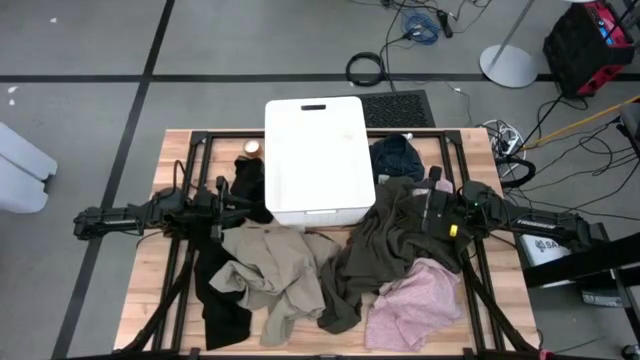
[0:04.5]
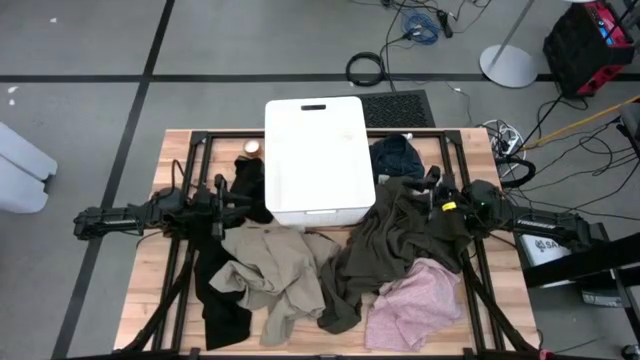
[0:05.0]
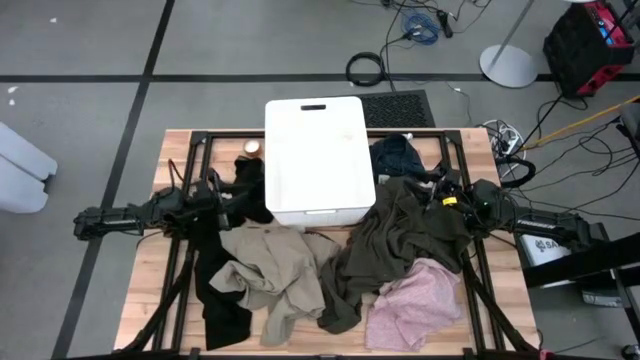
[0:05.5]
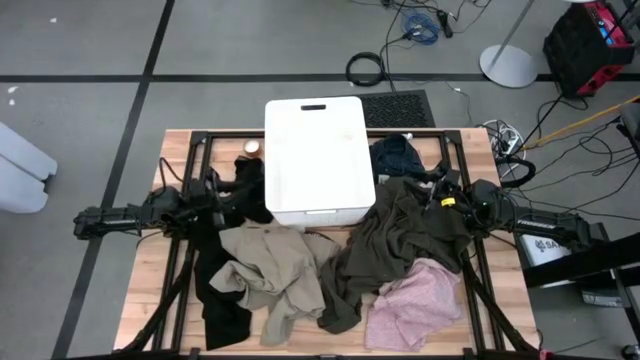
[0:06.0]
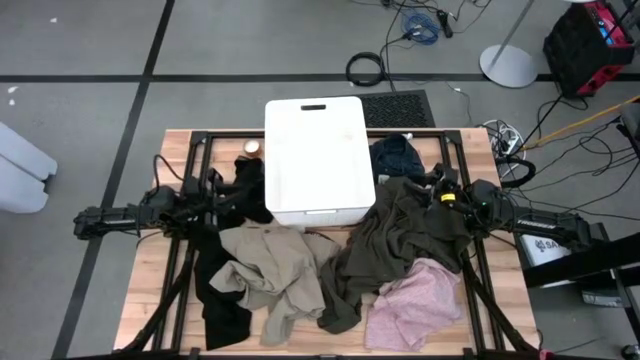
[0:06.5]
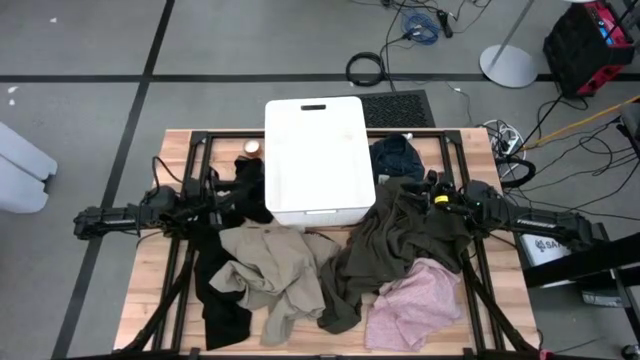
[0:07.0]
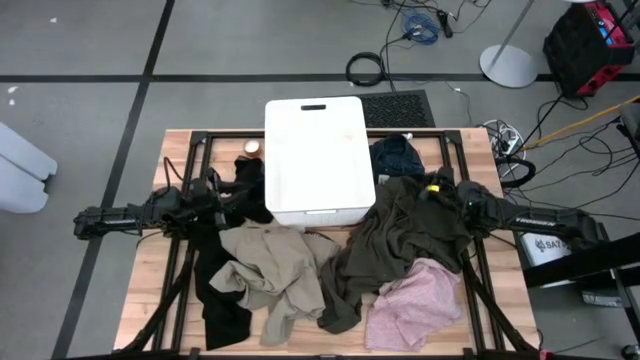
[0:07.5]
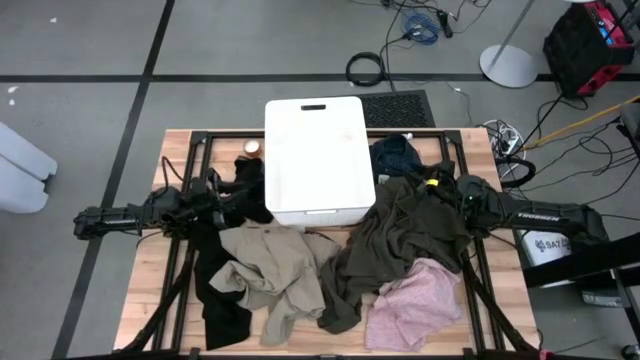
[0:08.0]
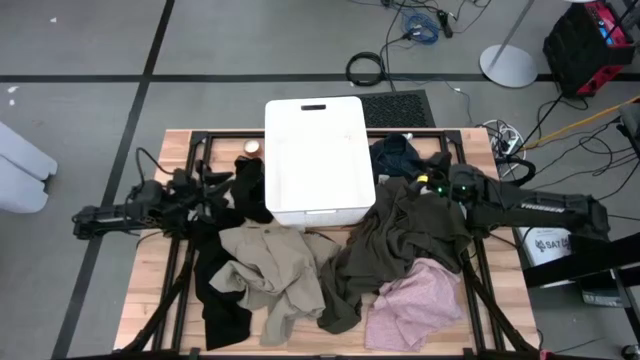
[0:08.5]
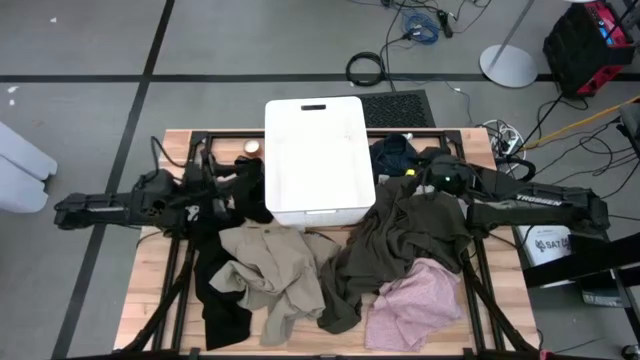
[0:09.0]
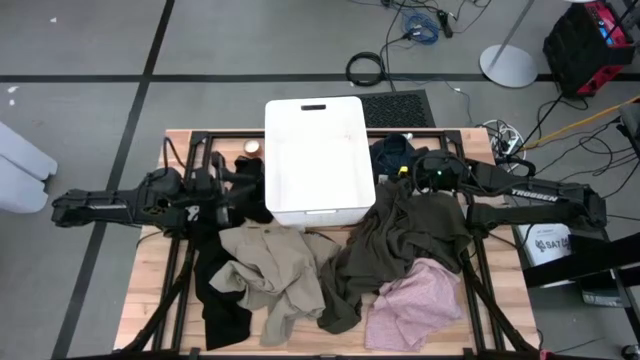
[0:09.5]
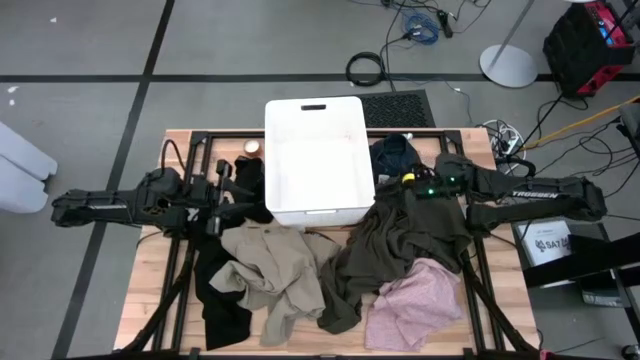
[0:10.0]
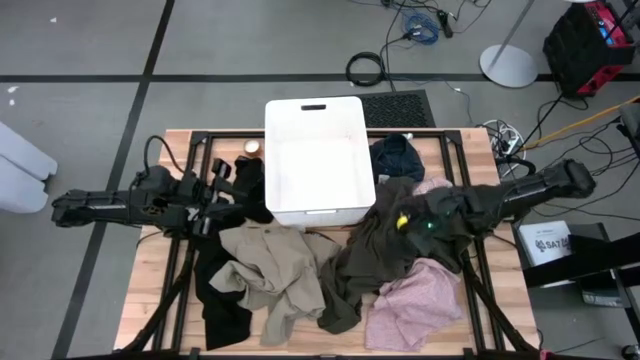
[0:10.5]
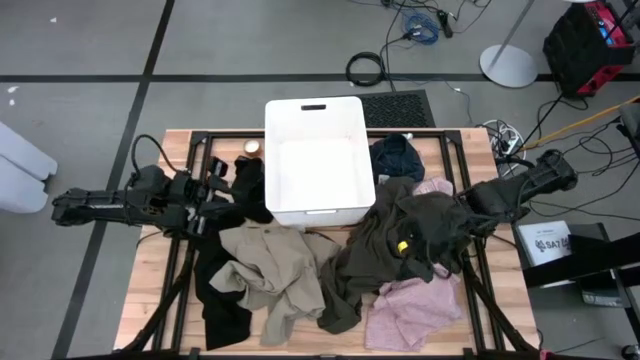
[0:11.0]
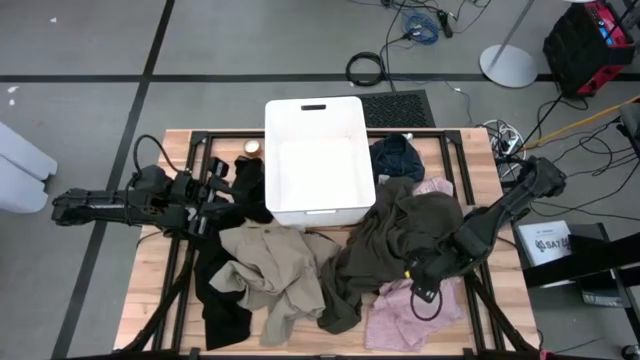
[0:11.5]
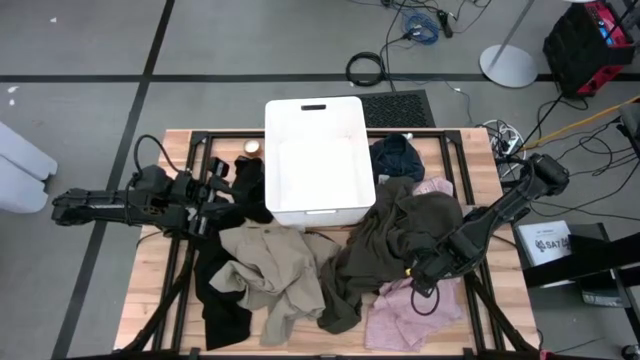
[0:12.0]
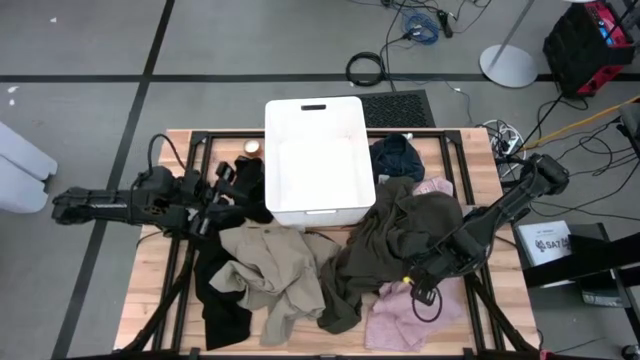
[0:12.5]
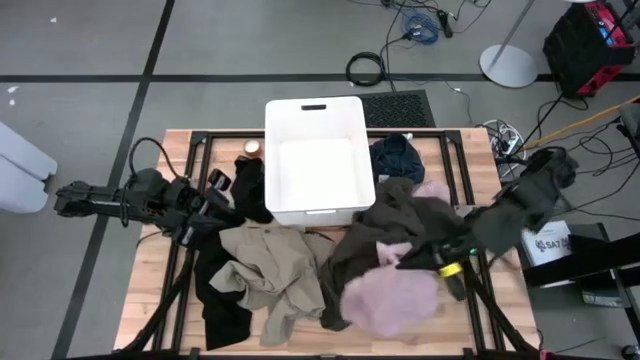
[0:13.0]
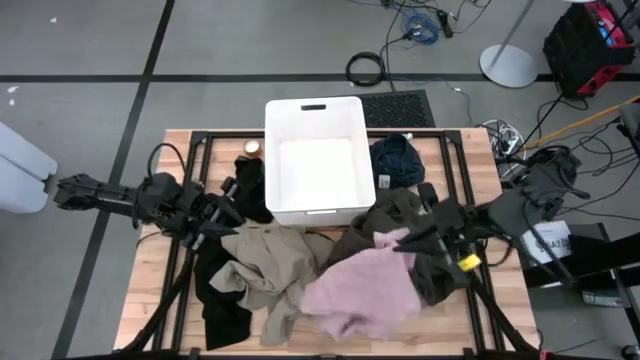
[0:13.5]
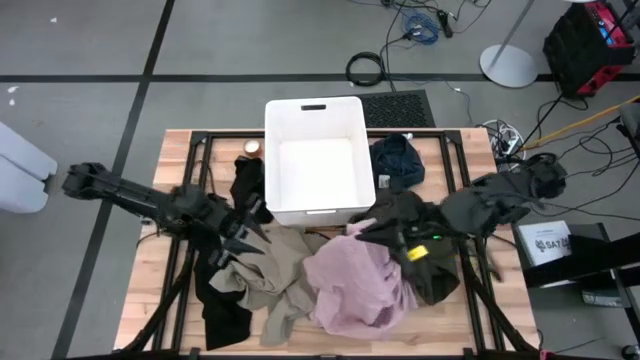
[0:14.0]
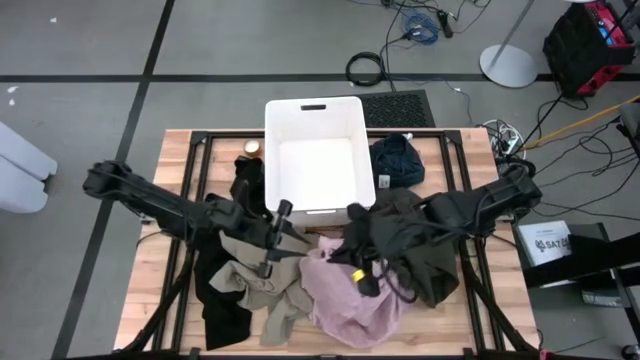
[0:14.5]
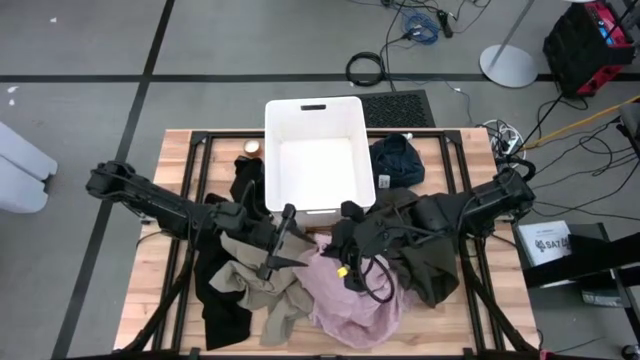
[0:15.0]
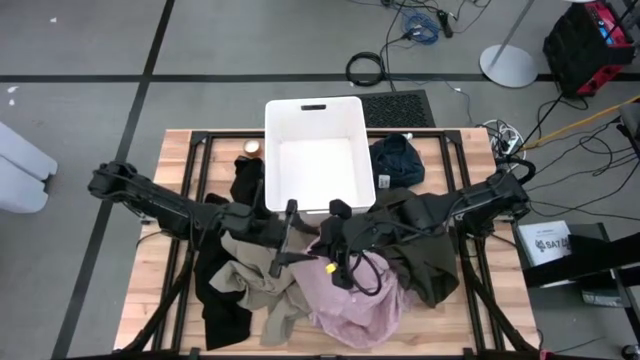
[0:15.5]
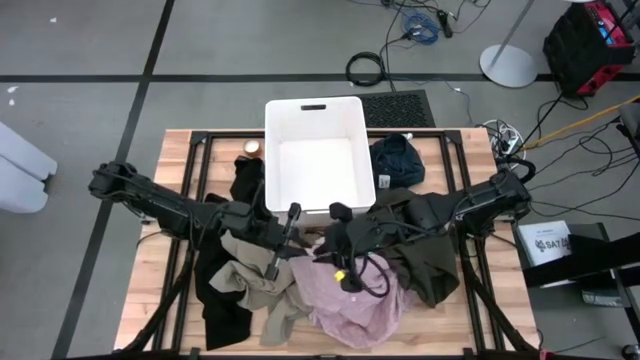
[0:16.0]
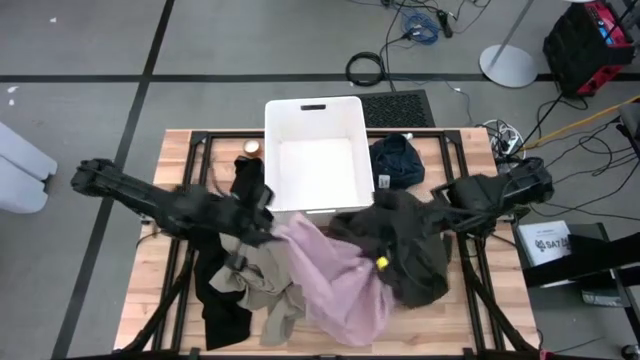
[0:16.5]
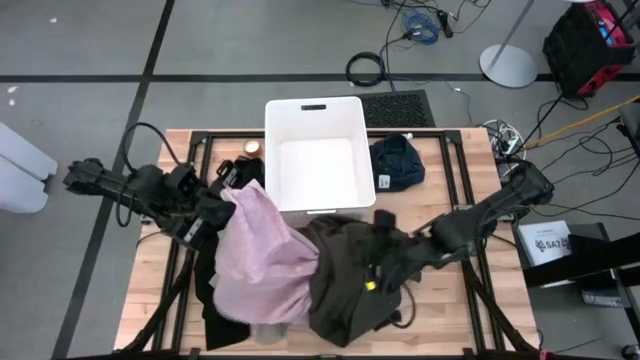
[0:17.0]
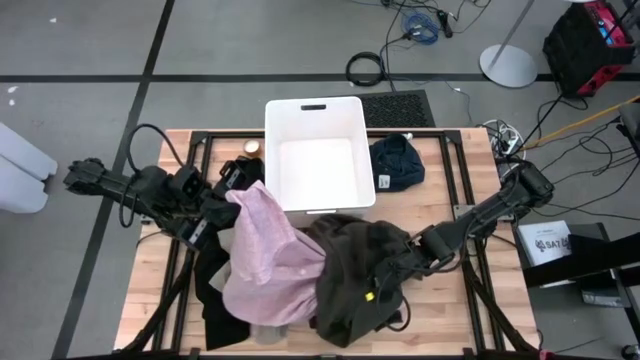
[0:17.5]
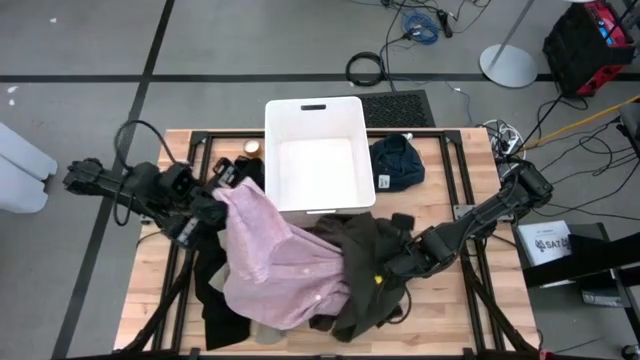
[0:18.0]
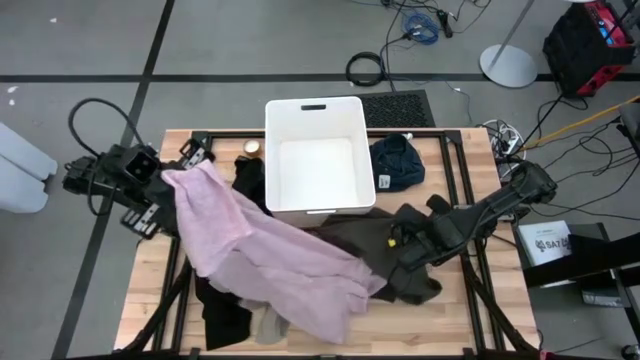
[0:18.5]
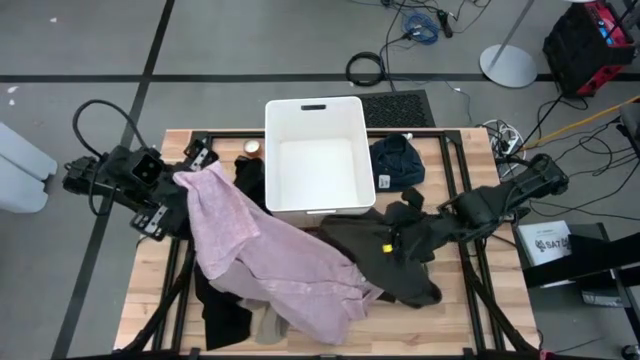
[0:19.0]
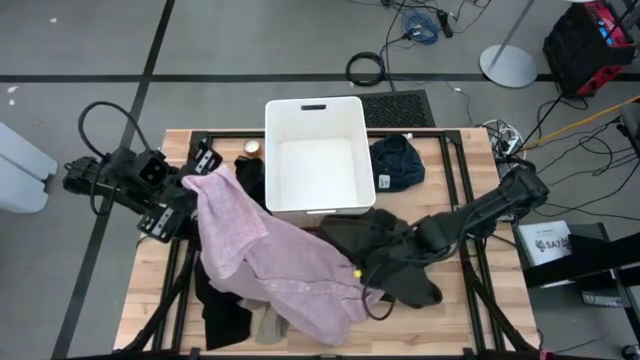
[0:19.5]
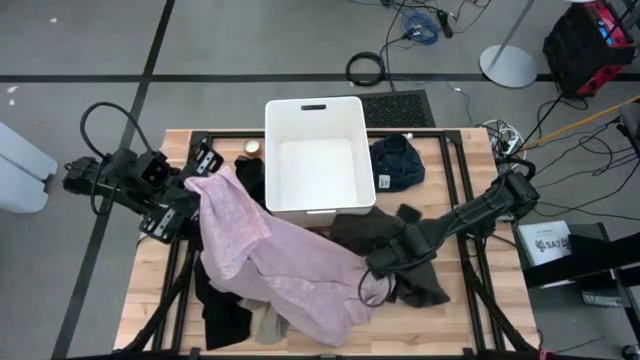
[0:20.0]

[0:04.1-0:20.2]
Task: Fold laundry
Put the pink polo into the white laundry bin

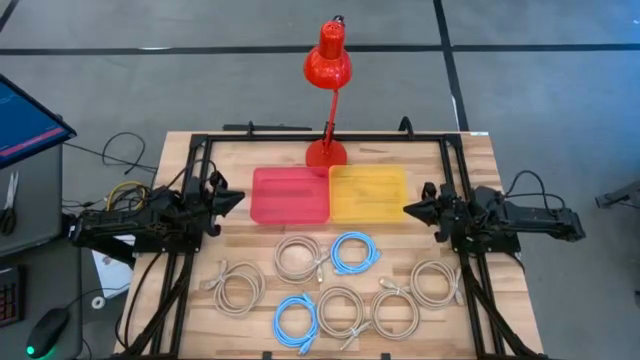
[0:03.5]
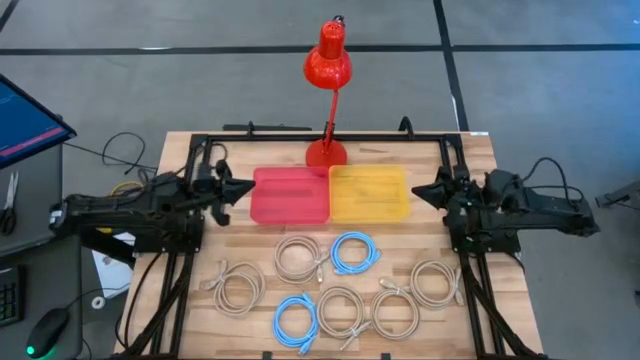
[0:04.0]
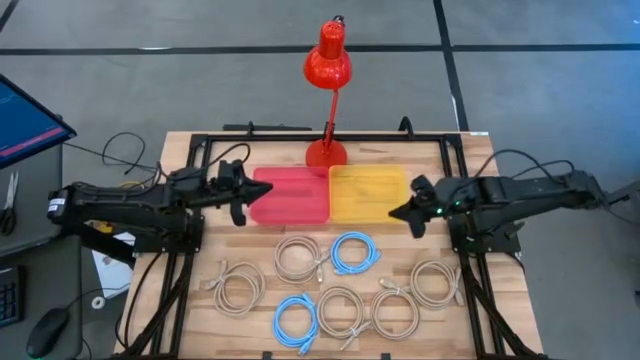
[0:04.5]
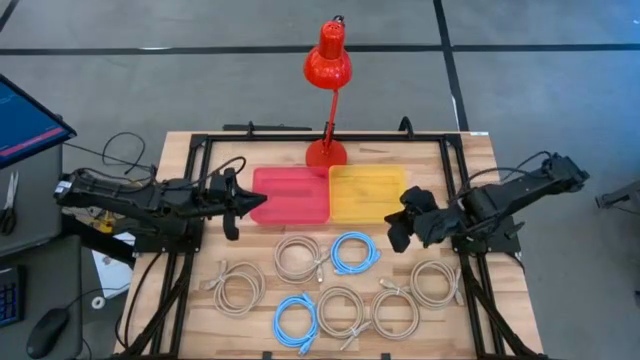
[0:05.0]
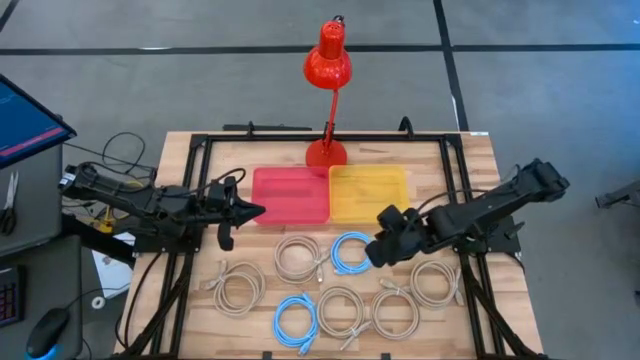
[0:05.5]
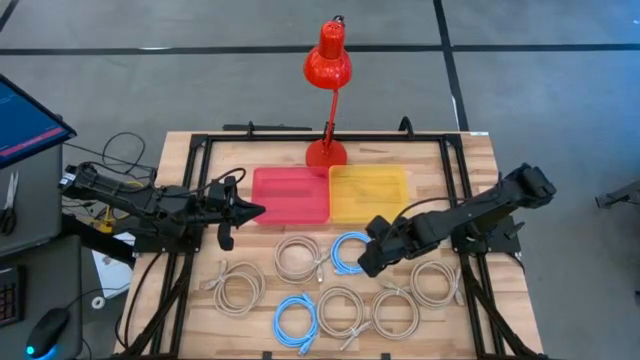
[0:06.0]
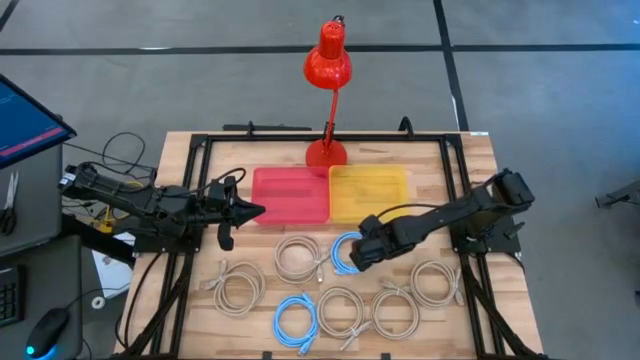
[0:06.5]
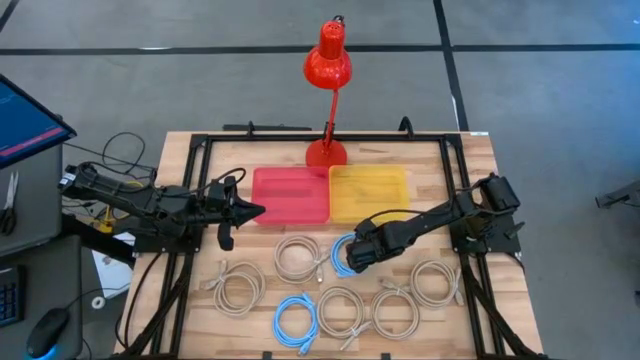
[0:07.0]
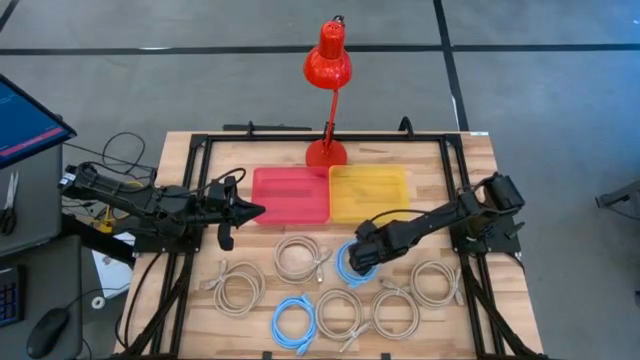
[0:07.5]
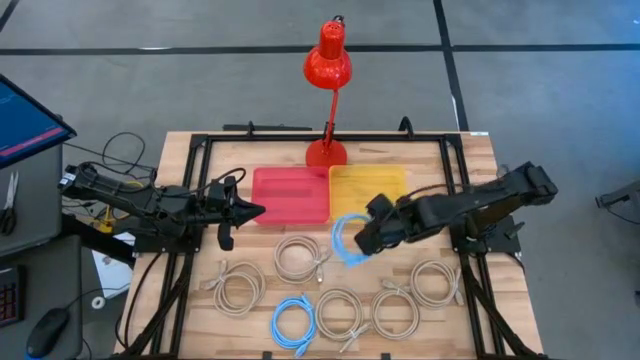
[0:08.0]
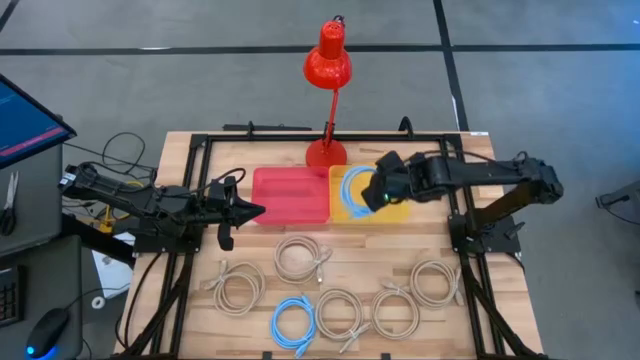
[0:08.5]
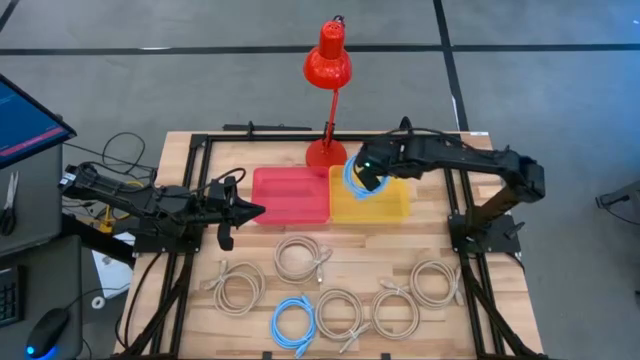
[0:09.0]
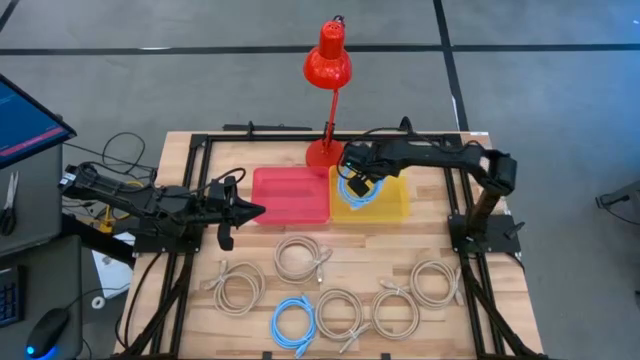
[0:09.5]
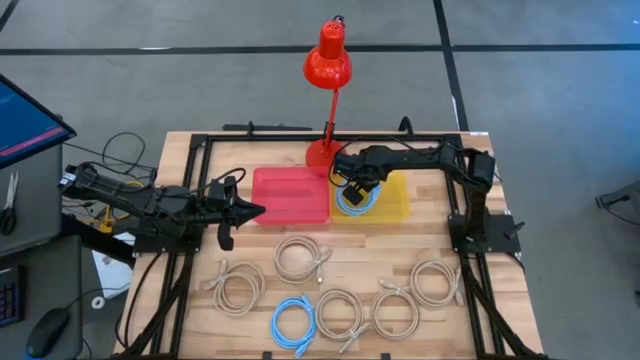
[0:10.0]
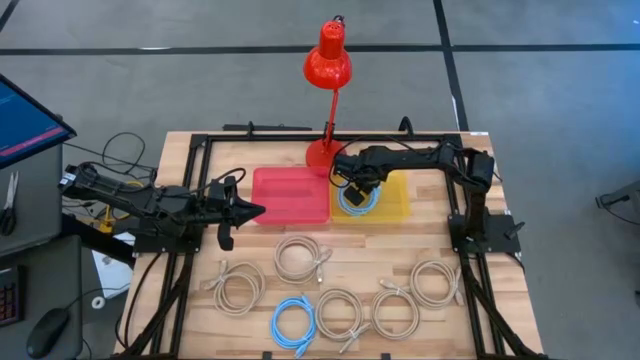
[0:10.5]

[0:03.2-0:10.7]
Task: Sort HDMI cables
Put the blue HDMI cable into the yellow bin
